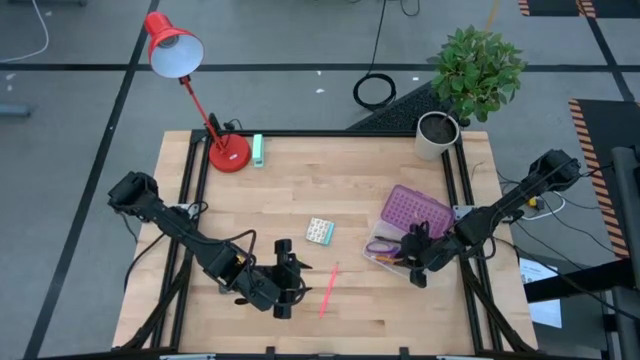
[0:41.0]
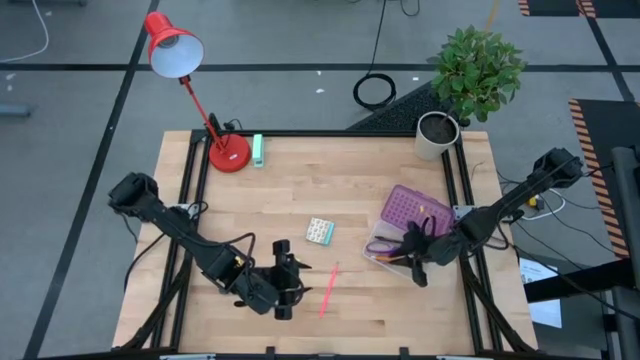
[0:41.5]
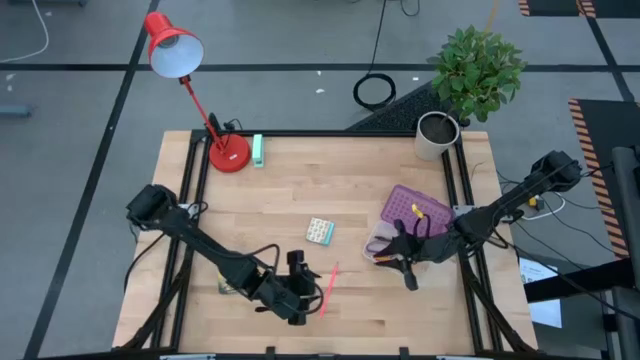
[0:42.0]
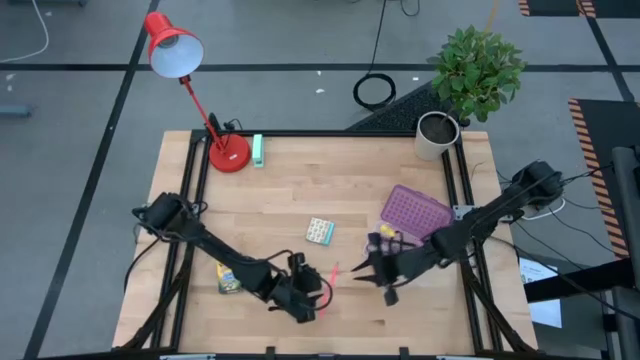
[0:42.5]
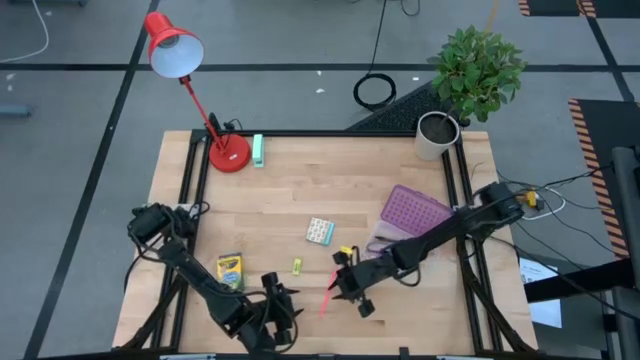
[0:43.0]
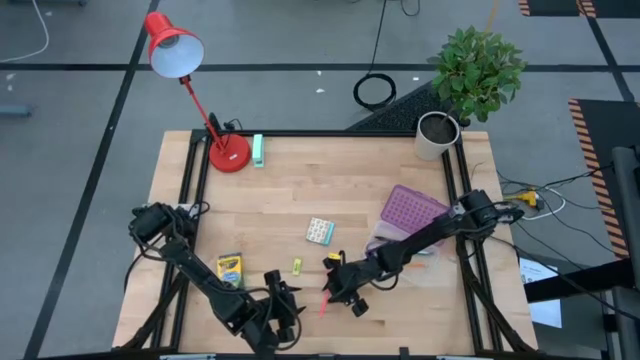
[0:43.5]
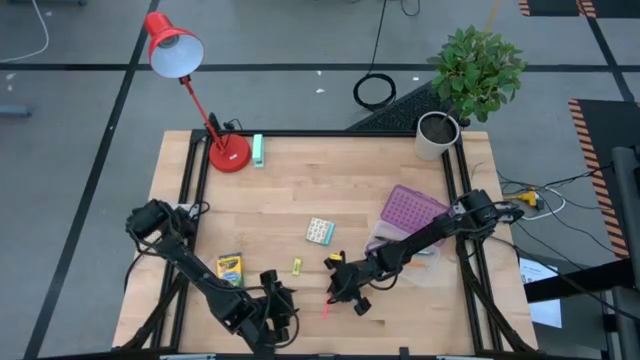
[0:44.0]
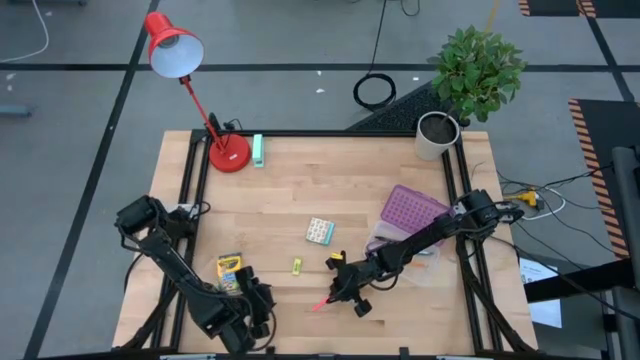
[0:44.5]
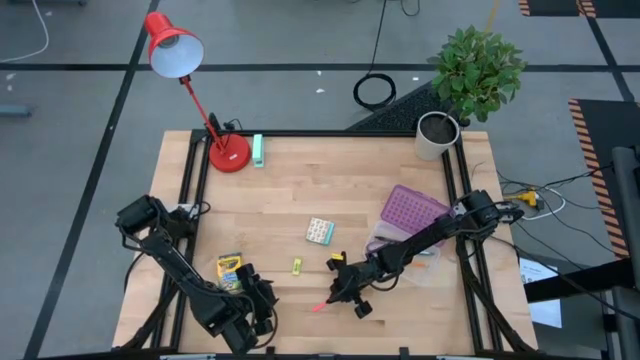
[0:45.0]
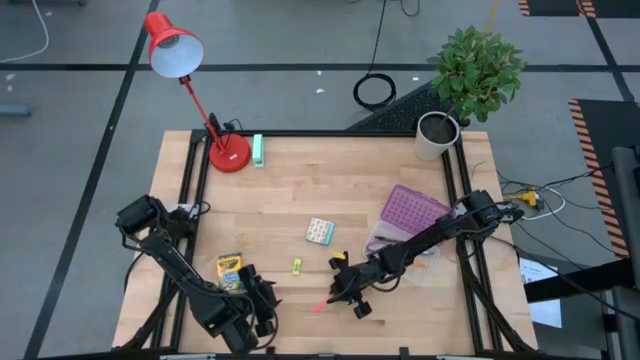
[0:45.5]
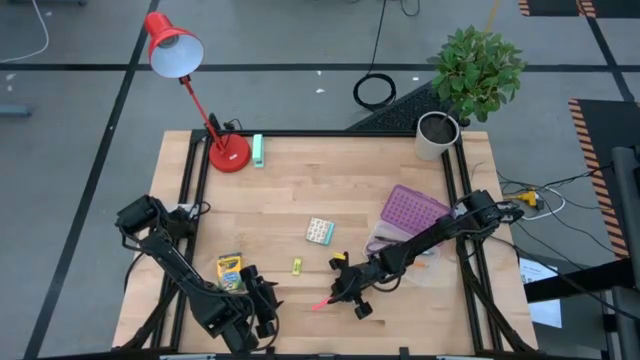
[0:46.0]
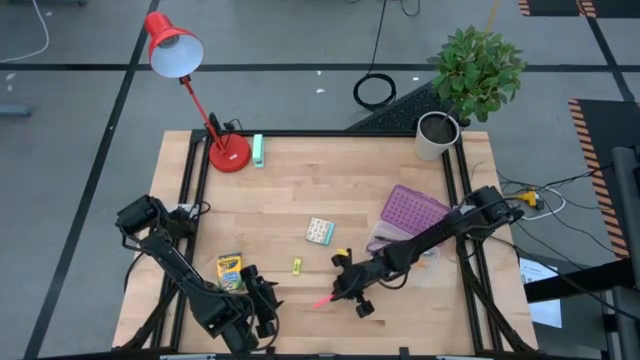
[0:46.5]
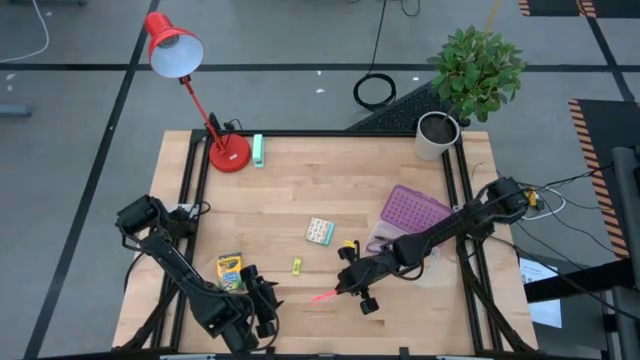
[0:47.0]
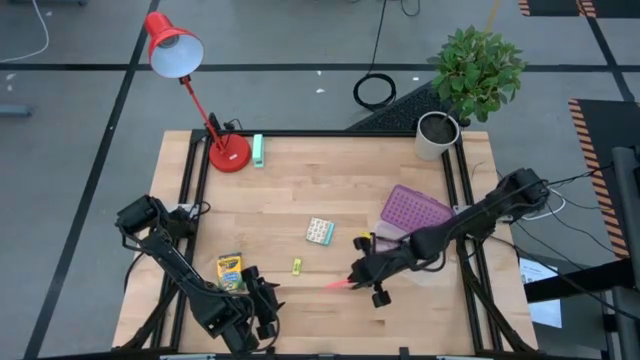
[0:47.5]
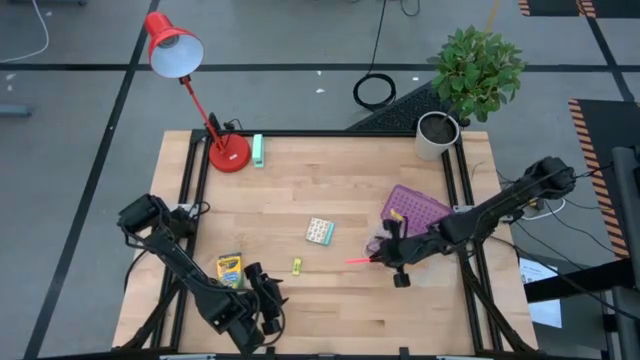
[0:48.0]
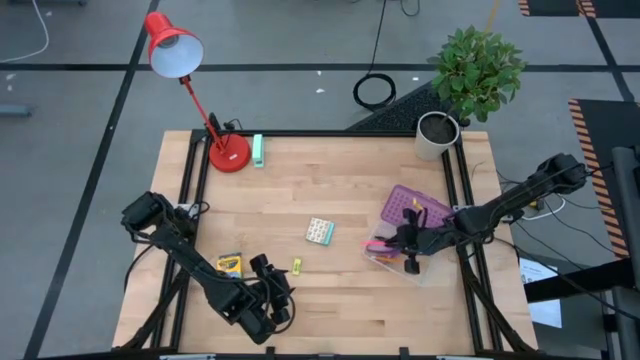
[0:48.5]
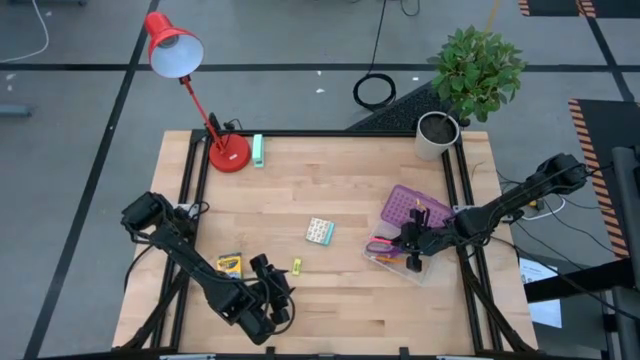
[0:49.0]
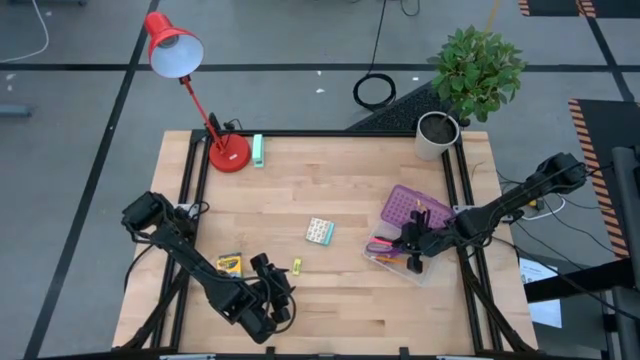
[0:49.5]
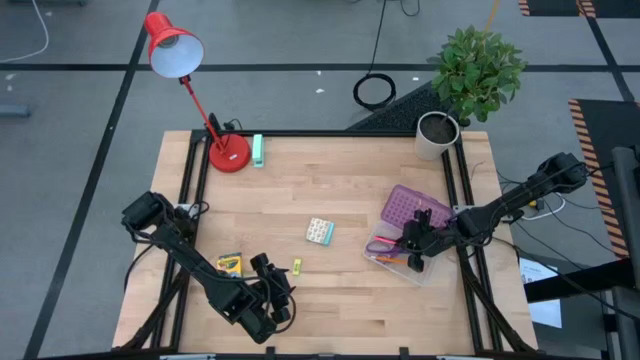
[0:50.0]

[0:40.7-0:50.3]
Task: Pack school essentials
Put the colored pencil into the supply box

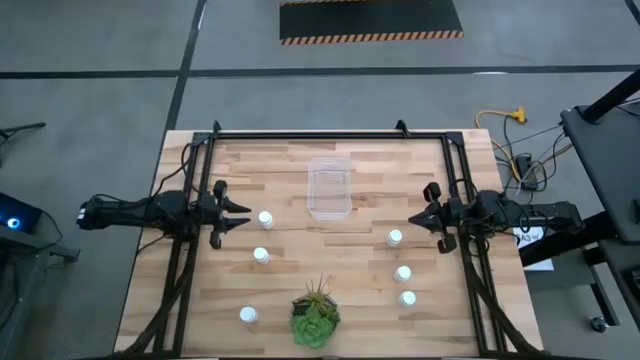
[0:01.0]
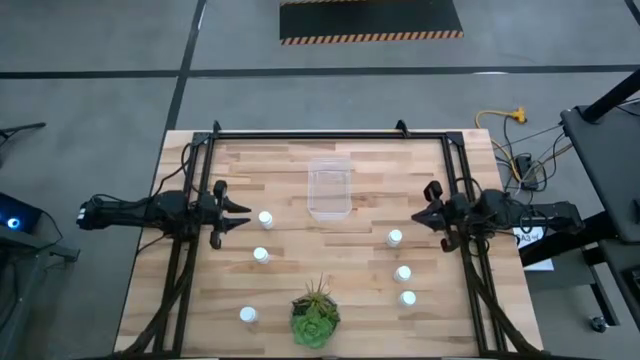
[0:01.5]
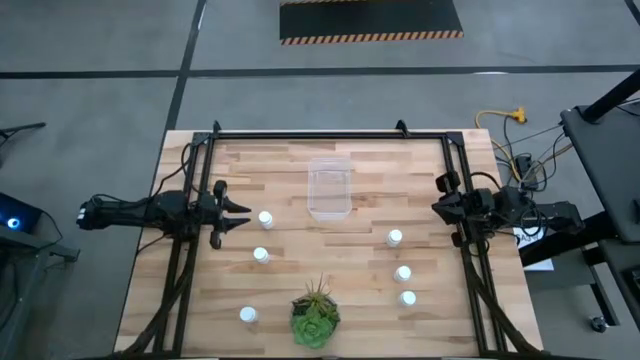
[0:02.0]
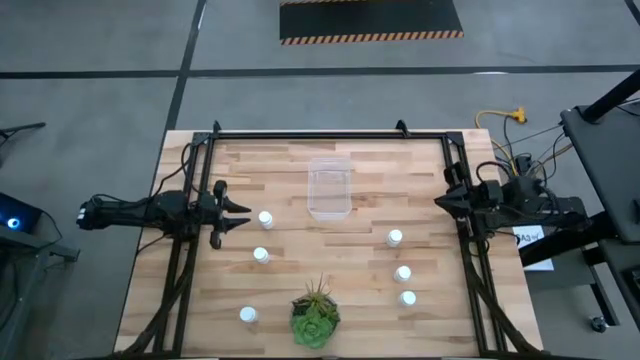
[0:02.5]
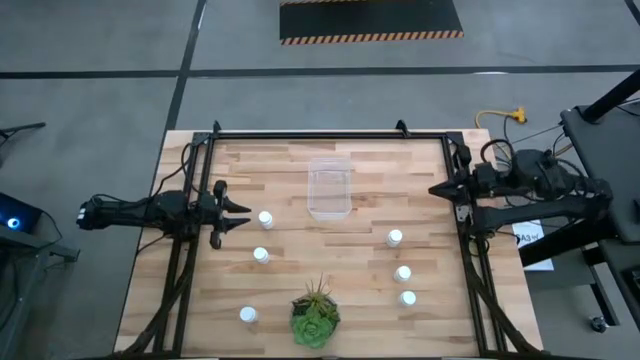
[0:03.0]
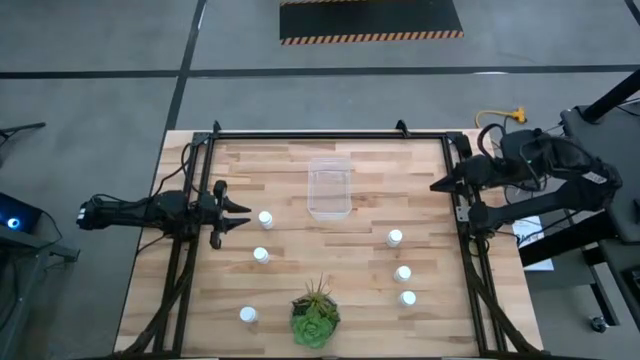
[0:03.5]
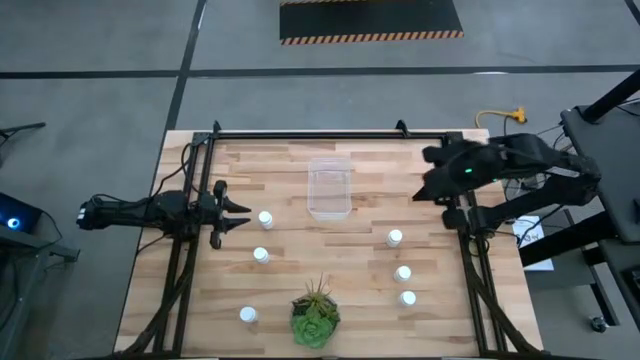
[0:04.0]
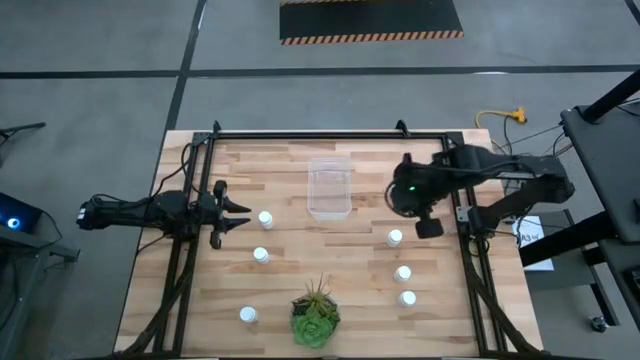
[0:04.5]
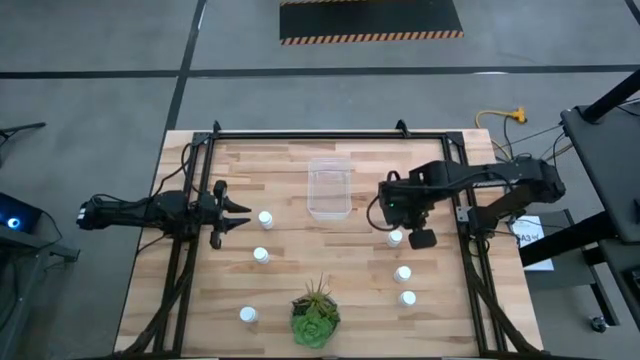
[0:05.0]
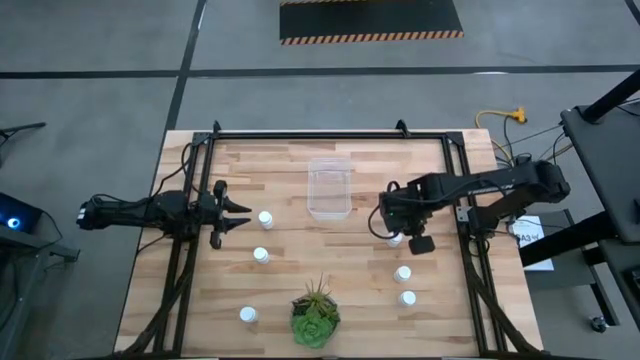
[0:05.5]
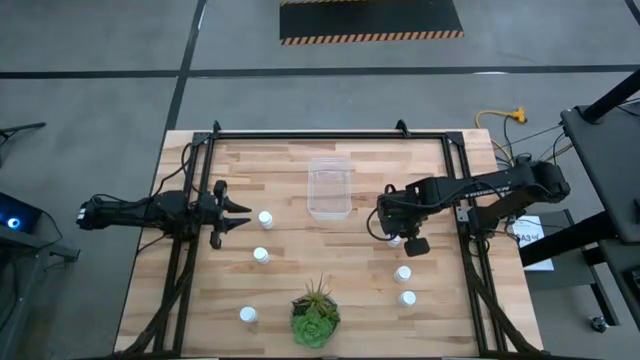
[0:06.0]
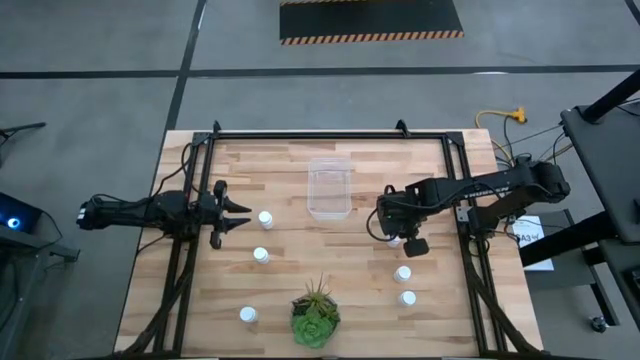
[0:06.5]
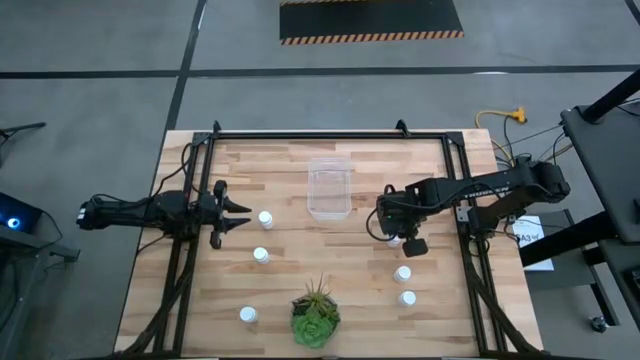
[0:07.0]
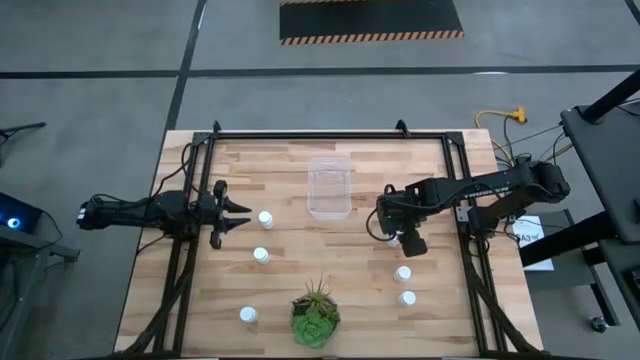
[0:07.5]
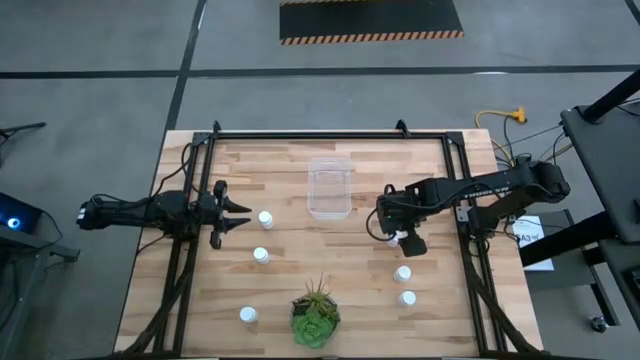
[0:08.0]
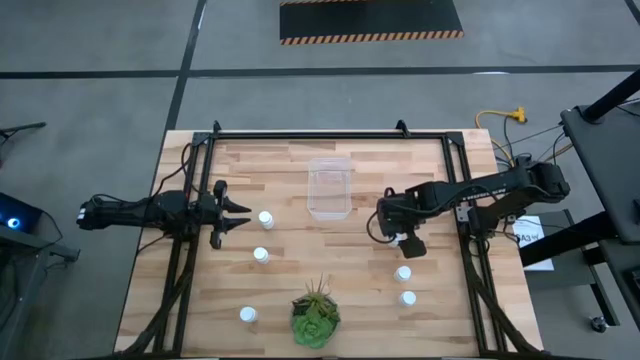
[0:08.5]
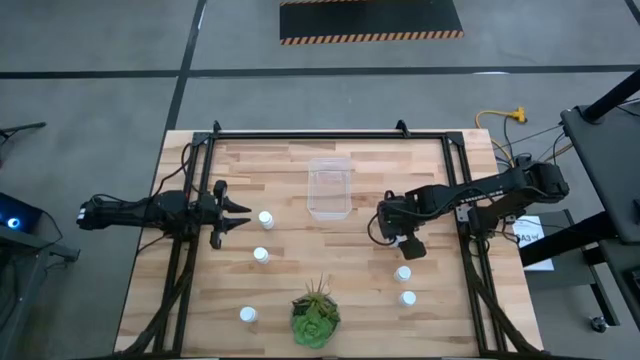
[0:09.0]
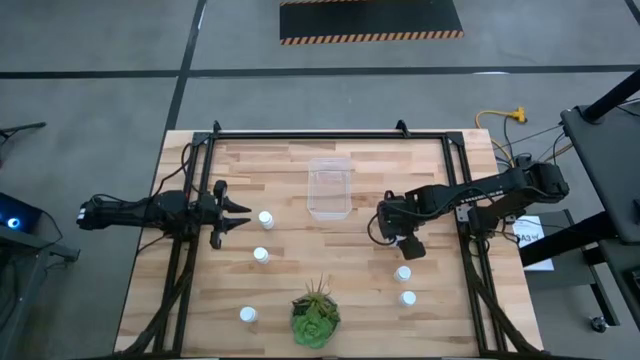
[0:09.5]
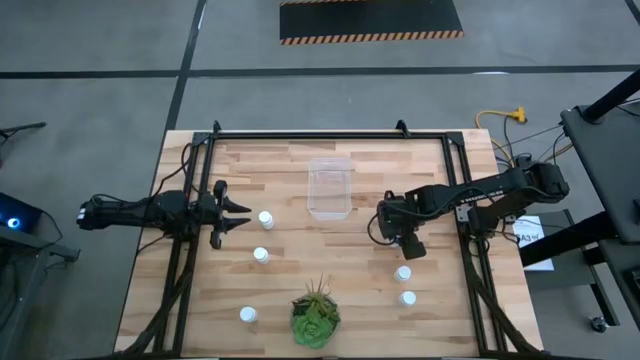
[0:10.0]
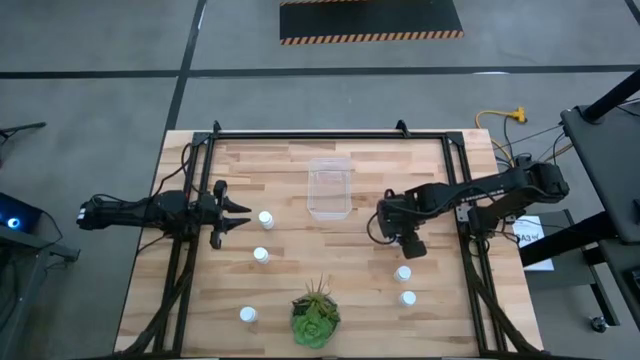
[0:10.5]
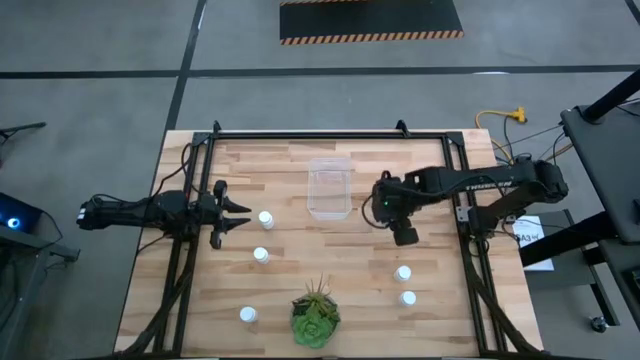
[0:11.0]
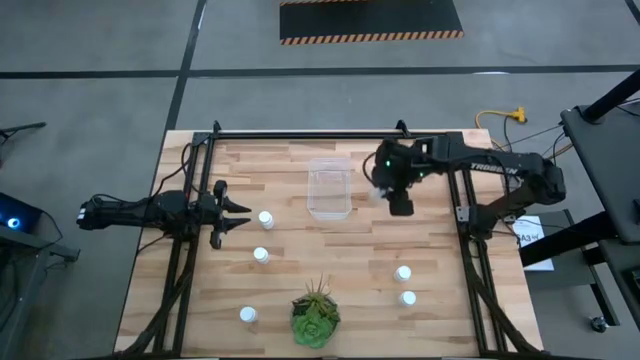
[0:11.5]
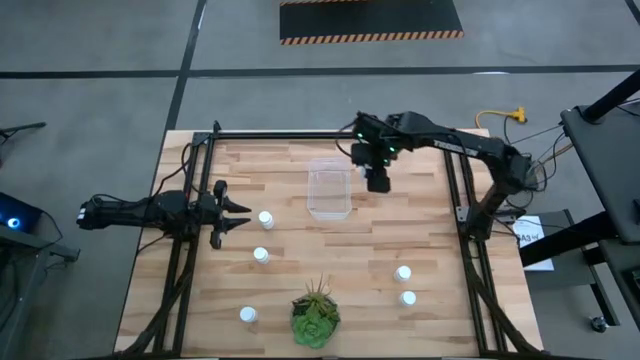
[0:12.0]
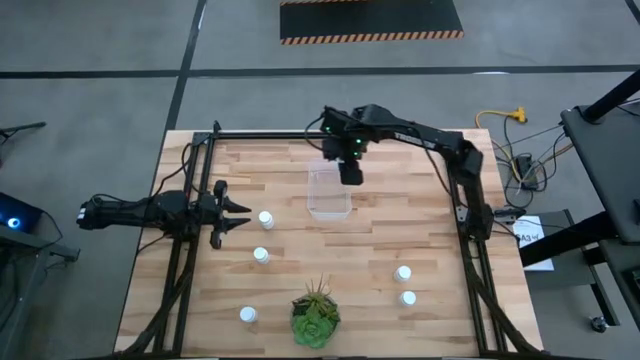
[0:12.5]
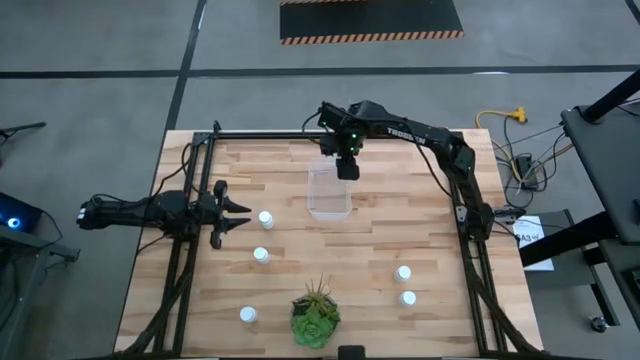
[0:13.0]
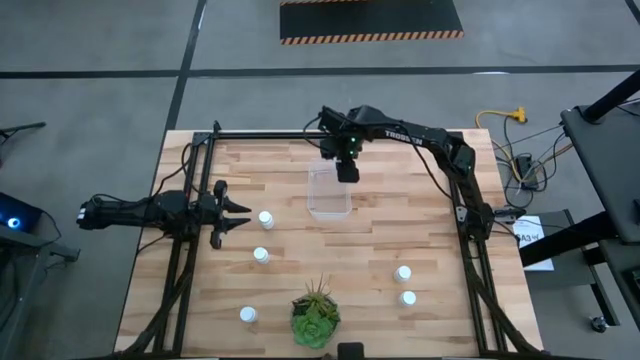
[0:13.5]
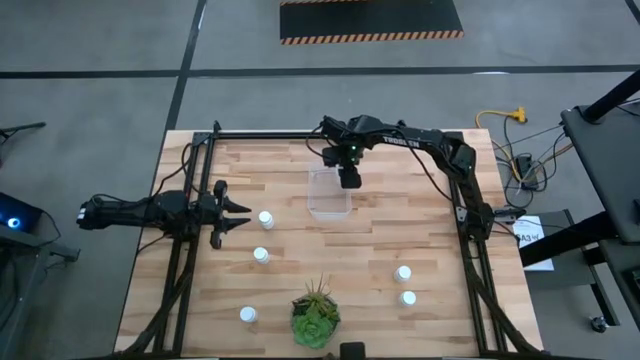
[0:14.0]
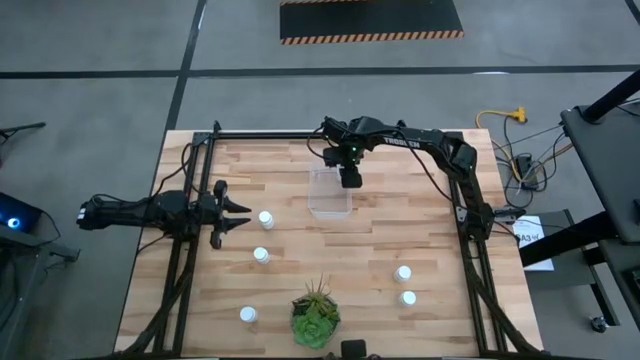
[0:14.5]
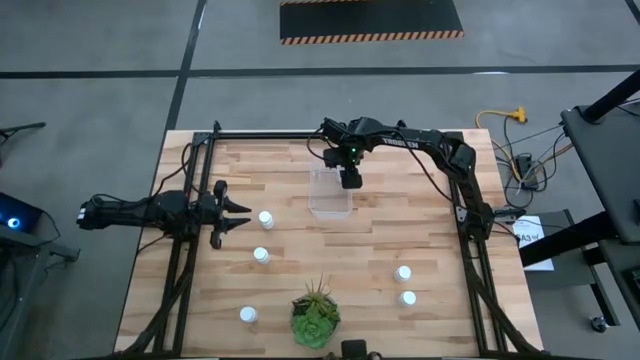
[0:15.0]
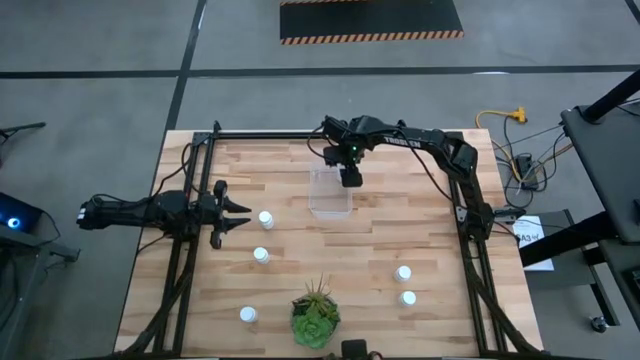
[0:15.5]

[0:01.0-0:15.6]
Task: Pick and place pill bottles into a basket
Put the white pill bottle into the transparent bin
